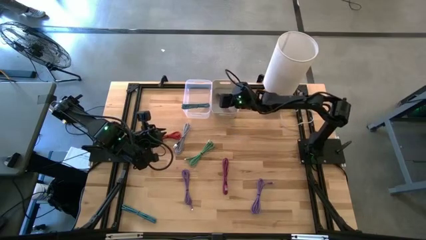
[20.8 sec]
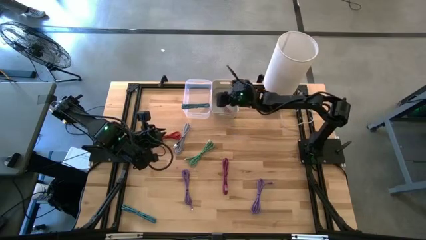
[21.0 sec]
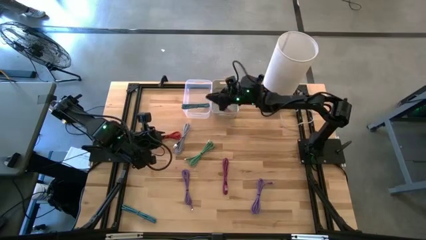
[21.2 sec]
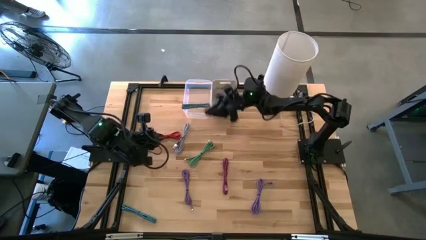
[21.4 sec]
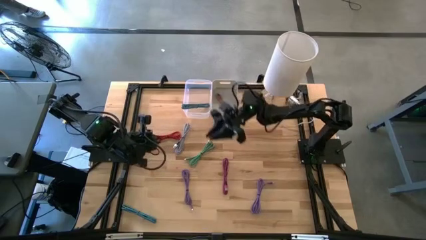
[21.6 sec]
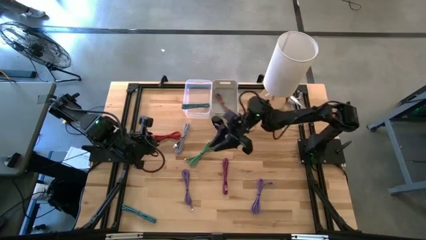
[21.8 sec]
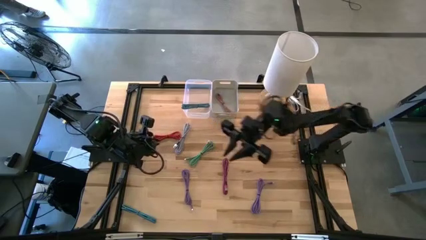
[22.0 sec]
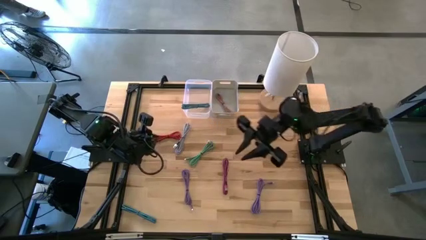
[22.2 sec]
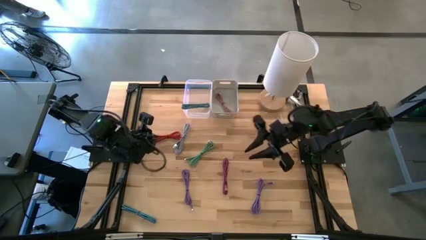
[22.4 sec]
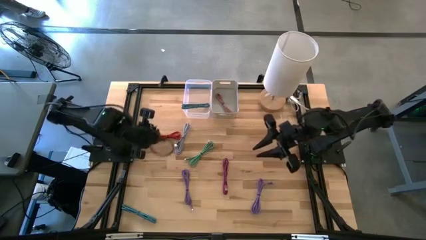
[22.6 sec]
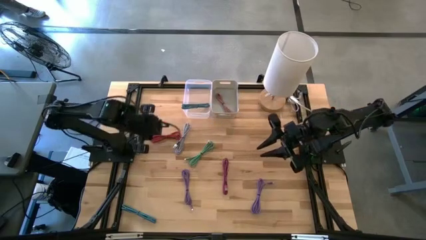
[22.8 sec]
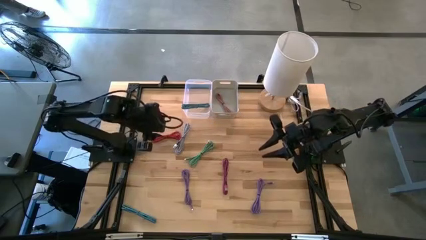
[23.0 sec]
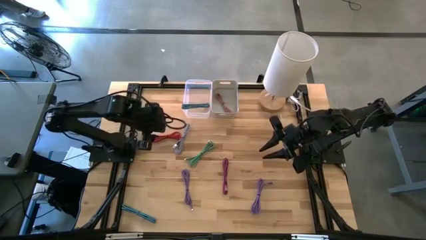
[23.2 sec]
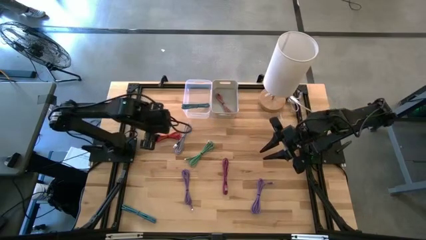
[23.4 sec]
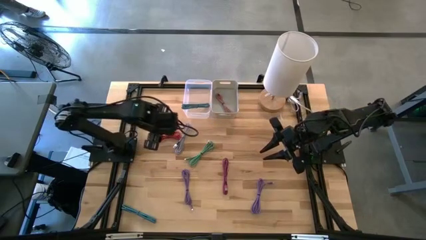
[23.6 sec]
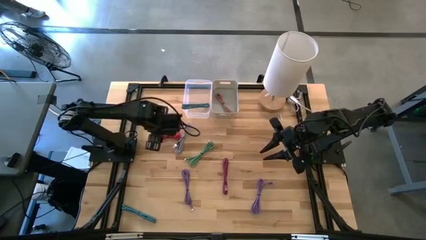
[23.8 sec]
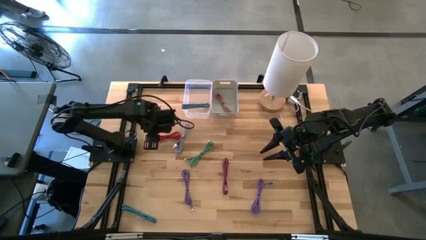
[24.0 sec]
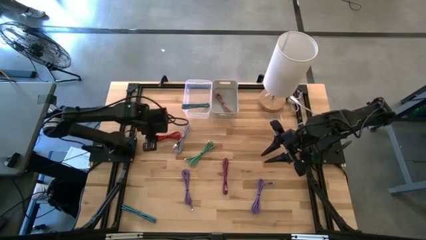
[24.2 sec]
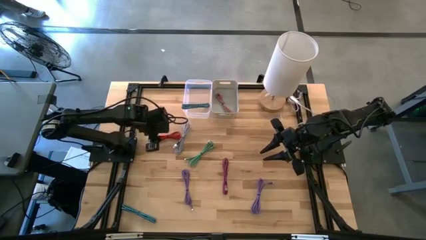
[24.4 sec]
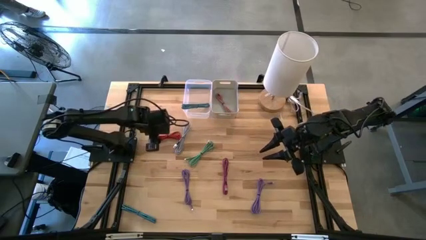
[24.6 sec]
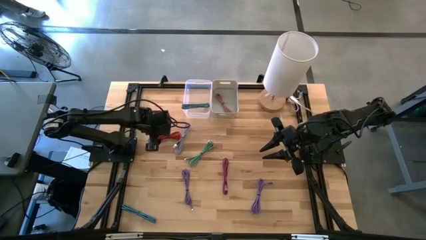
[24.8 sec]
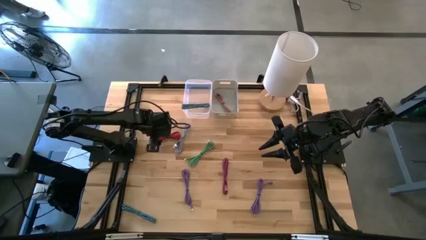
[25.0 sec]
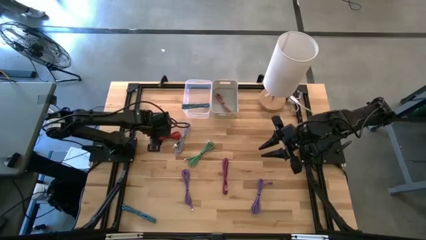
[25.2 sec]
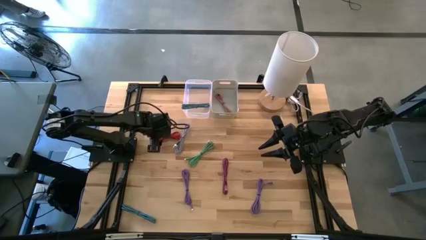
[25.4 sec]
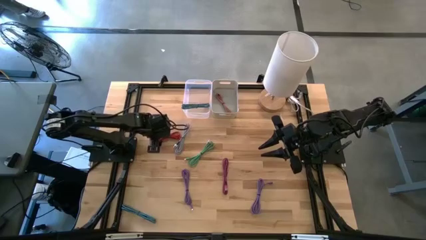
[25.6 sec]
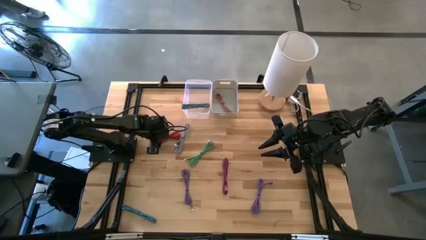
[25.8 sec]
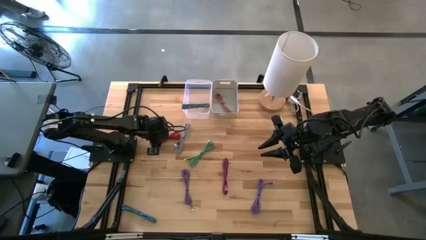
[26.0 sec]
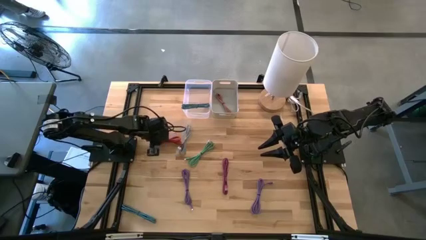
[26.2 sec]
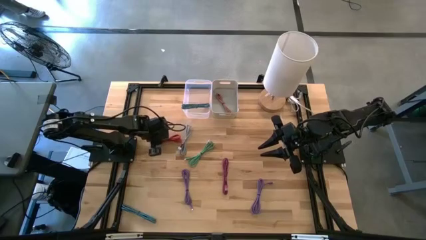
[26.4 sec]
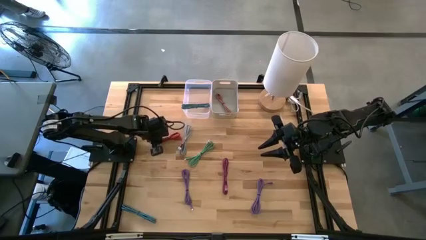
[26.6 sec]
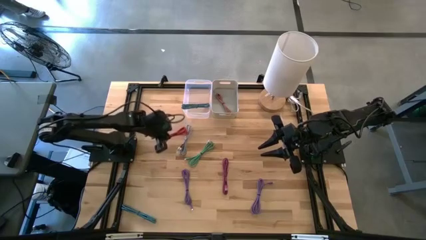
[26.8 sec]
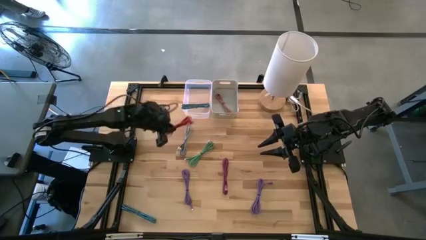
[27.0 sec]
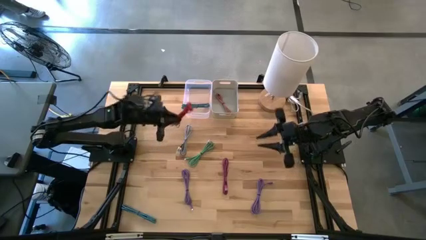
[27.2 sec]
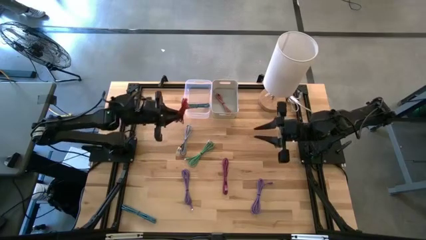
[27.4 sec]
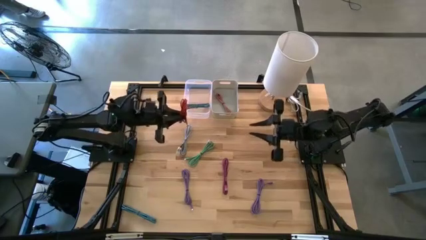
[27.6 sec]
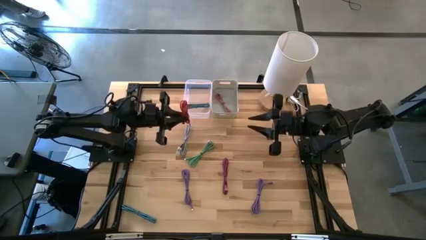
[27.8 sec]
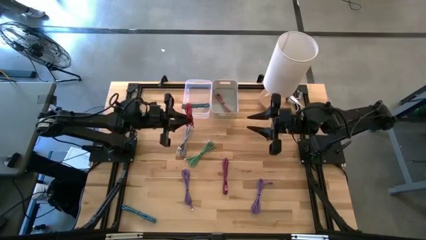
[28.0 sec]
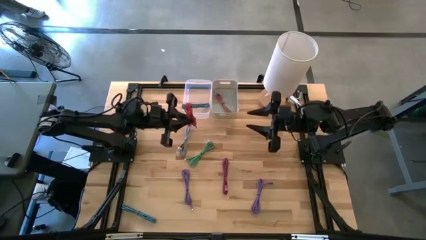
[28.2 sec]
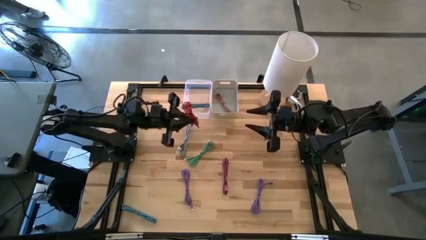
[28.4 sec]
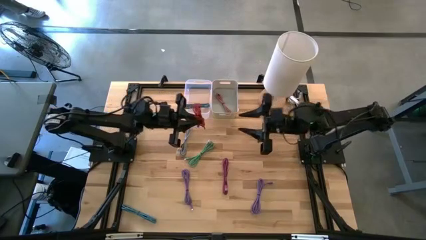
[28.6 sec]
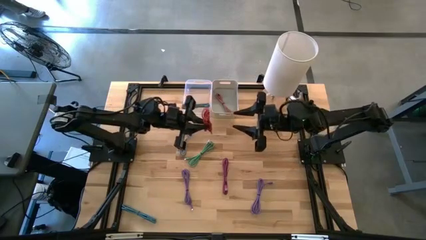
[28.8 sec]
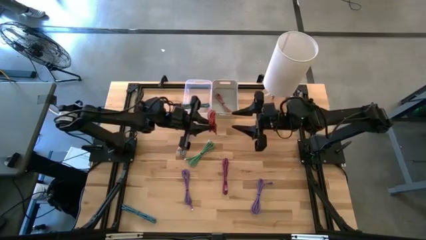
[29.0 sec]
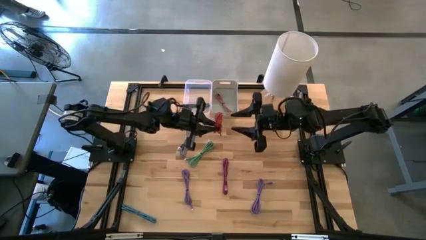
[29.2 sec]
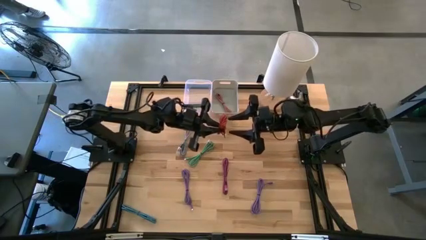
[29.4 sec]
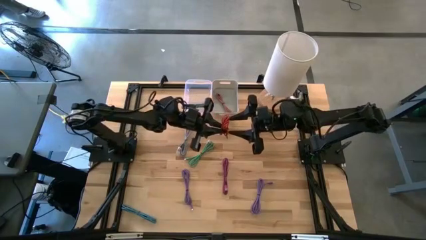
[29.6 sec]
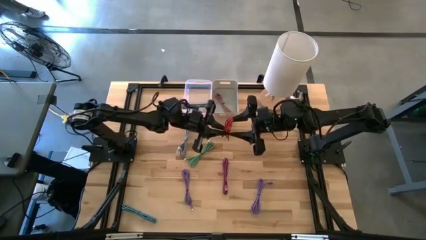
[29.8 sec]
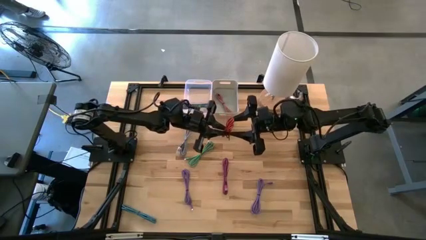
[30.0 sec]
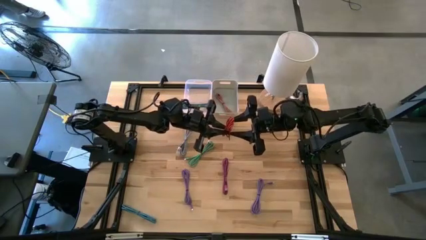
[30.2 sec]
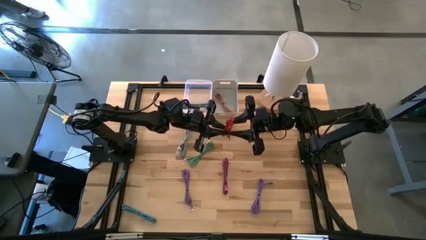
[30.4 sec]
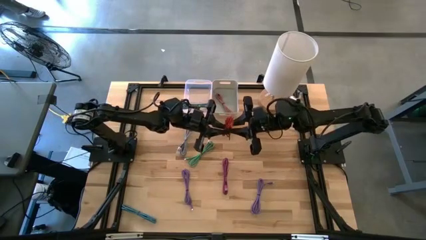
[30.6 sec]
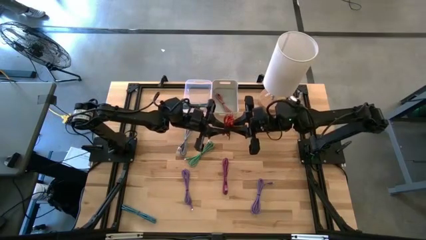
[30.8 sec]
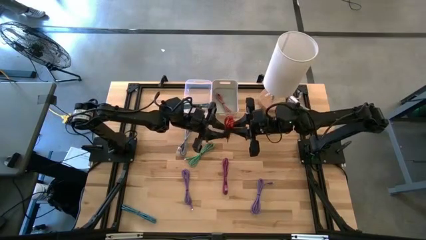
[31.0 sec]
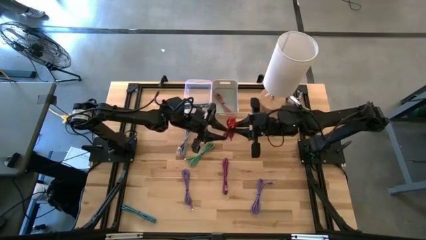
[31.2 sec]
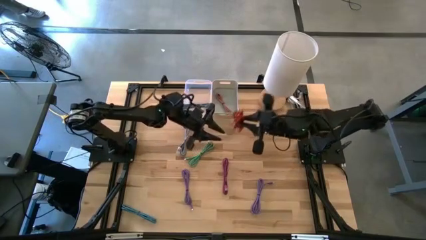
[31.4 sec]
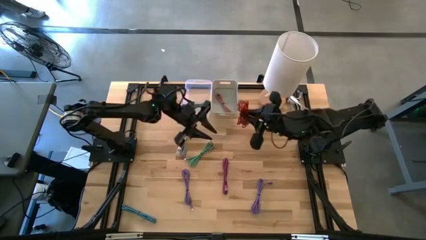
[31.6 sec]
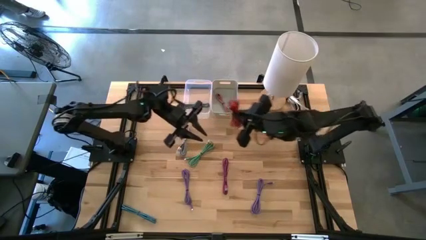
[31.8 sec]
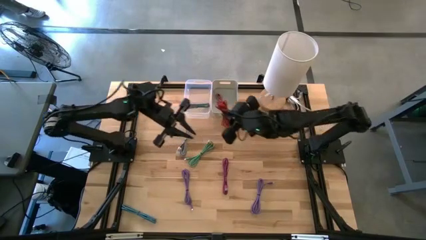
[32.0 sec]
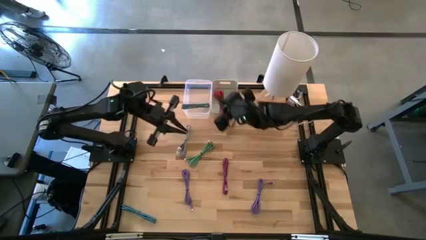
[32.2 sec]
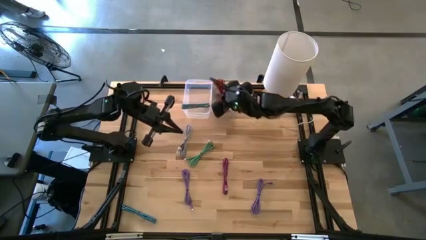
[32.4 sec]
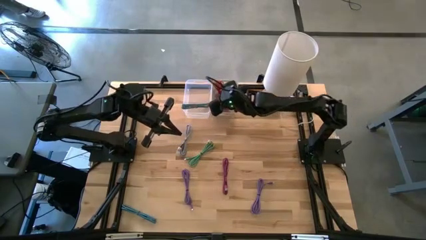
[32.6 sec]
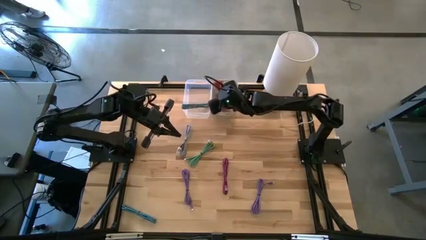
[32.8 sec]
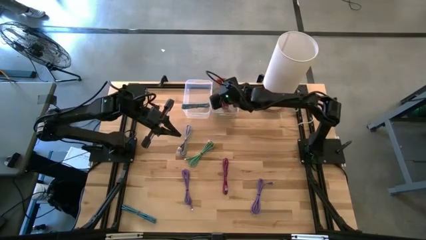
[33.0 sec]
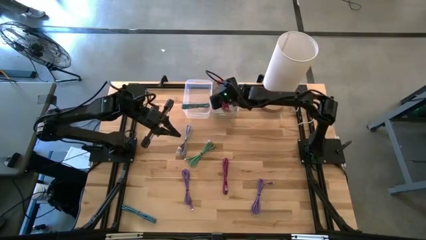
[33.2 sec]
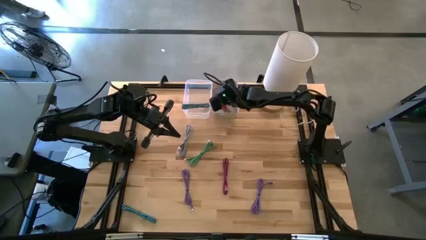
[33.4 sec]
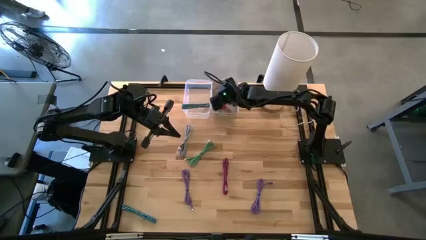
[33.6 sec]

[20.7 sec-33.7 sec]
Task: Pick & Place USB Port
Put the orange charger cable into the gray bin
